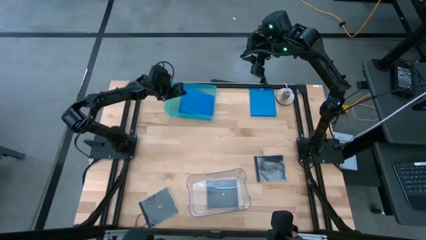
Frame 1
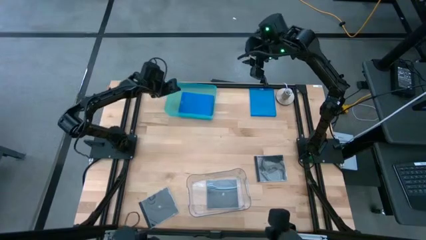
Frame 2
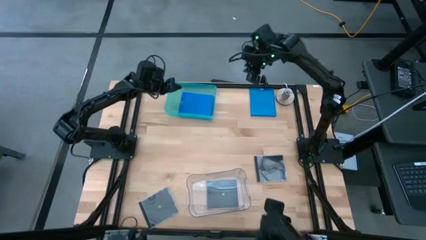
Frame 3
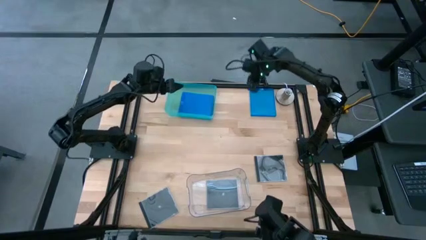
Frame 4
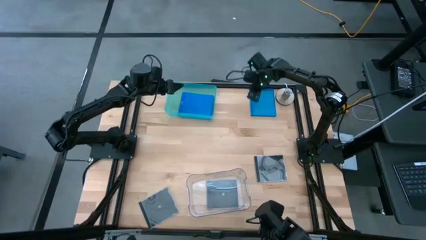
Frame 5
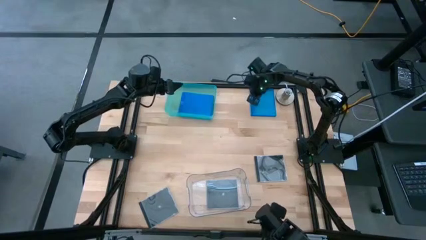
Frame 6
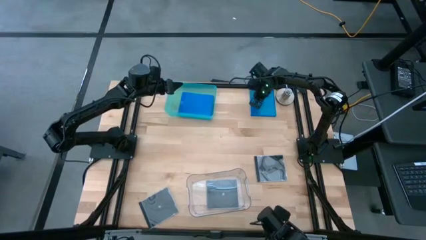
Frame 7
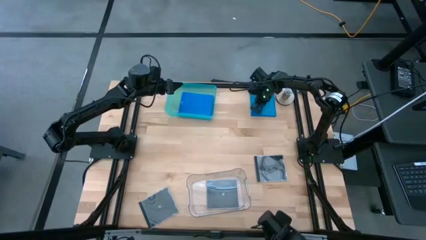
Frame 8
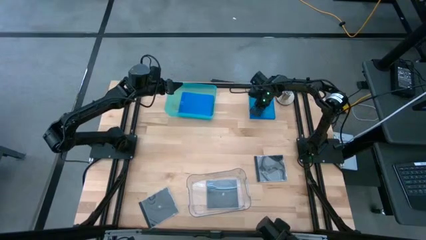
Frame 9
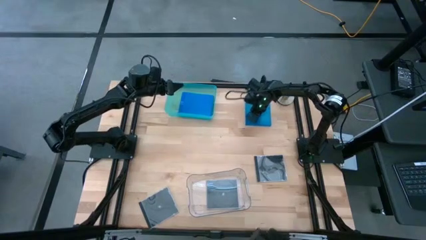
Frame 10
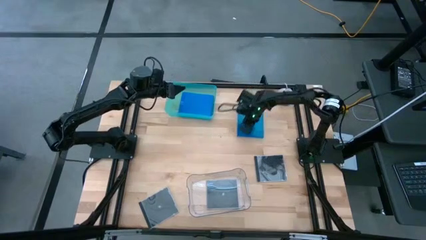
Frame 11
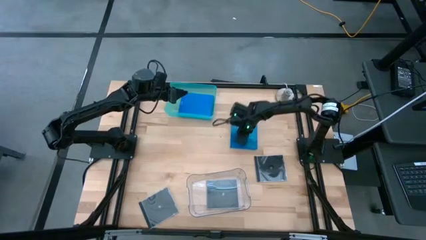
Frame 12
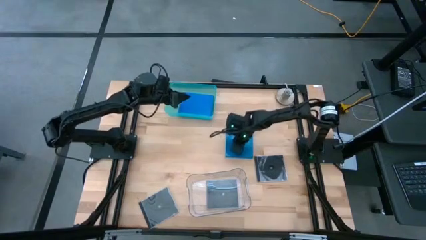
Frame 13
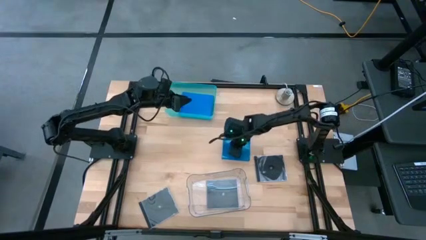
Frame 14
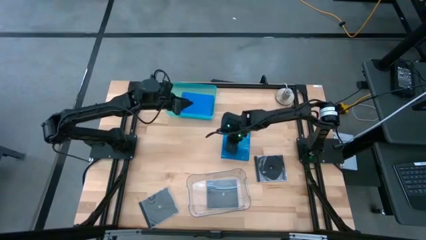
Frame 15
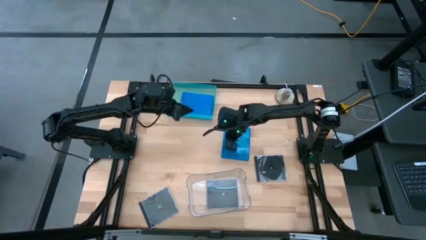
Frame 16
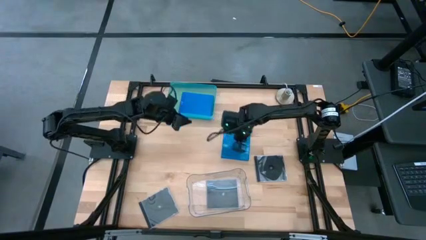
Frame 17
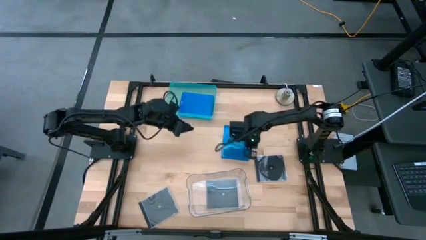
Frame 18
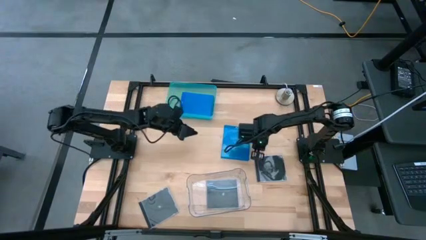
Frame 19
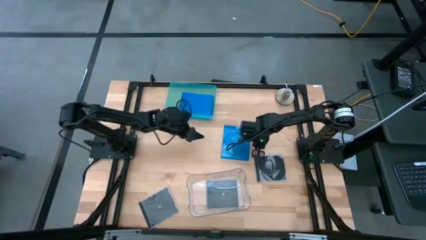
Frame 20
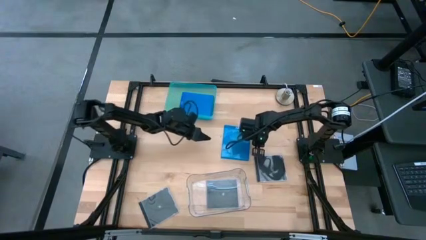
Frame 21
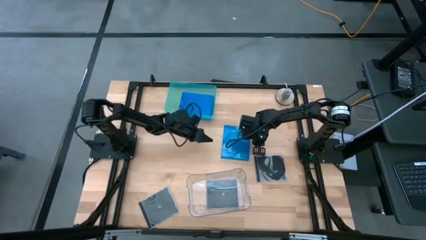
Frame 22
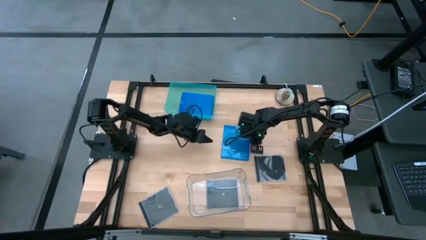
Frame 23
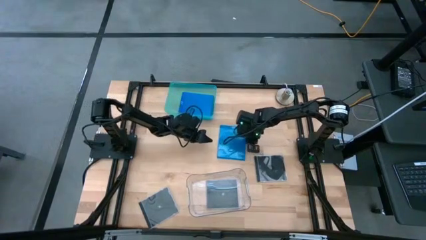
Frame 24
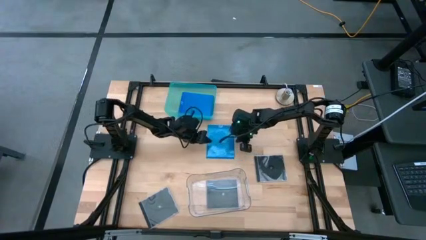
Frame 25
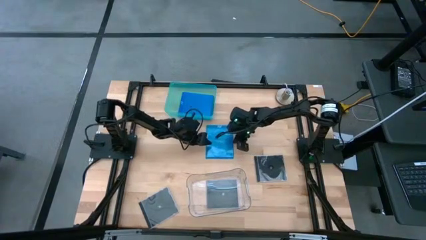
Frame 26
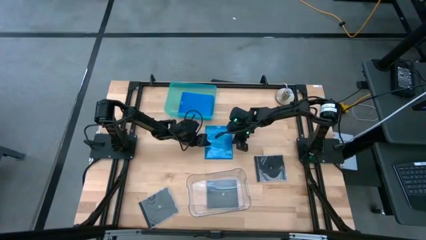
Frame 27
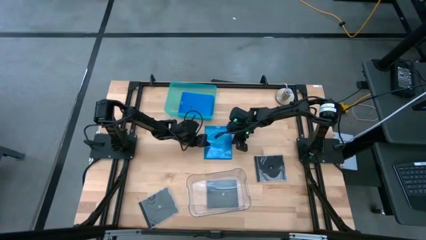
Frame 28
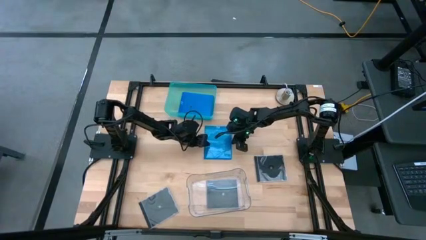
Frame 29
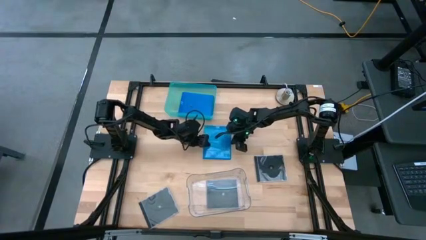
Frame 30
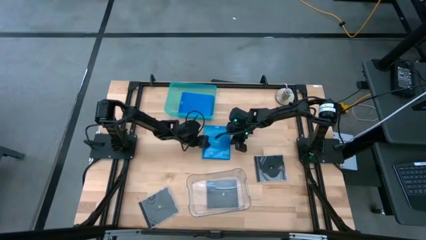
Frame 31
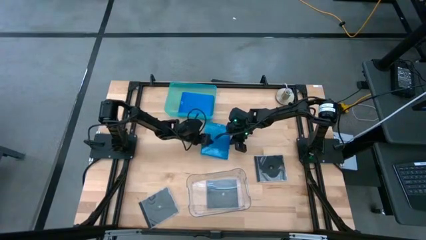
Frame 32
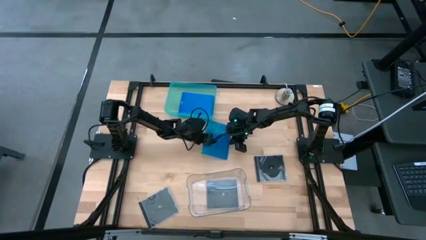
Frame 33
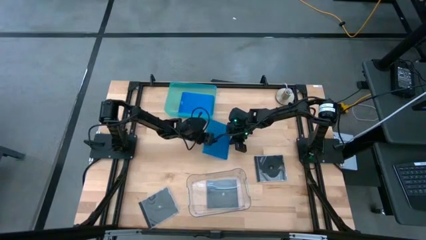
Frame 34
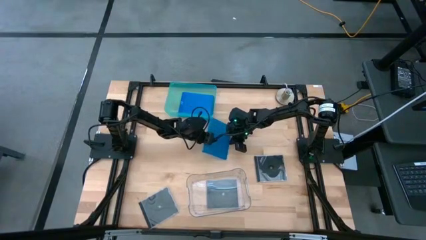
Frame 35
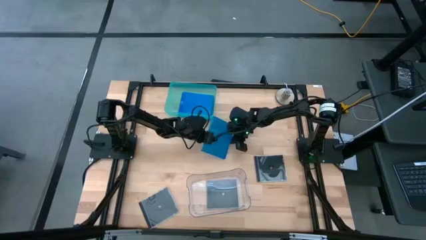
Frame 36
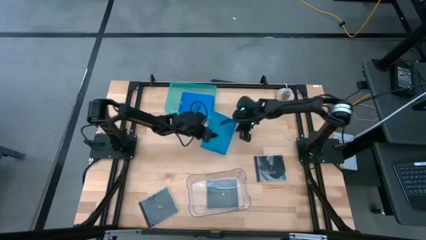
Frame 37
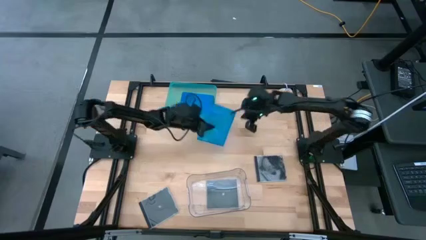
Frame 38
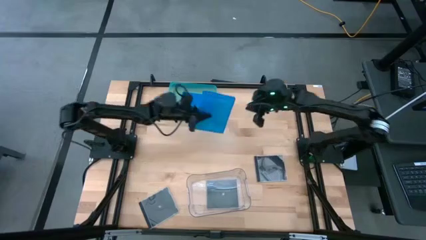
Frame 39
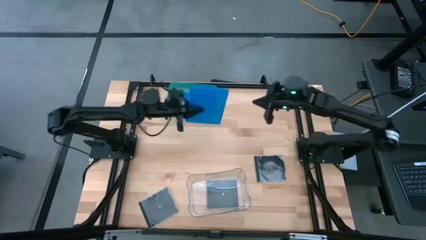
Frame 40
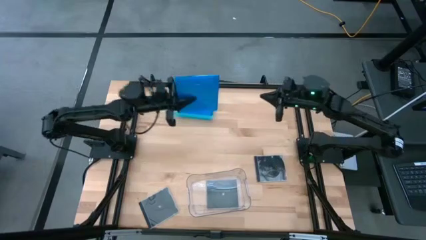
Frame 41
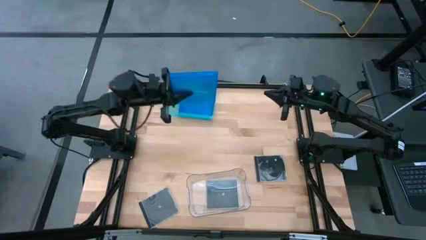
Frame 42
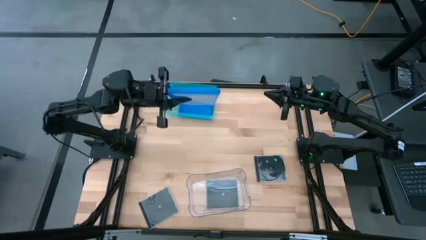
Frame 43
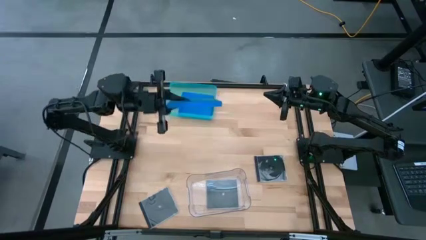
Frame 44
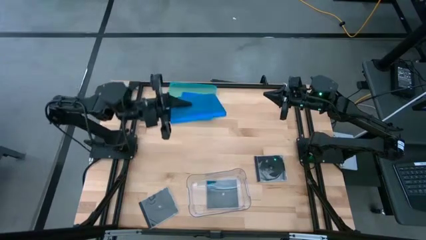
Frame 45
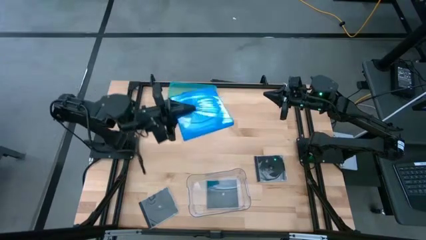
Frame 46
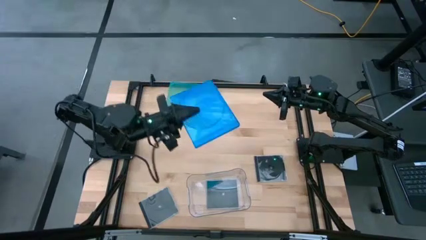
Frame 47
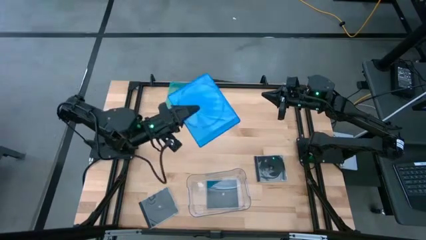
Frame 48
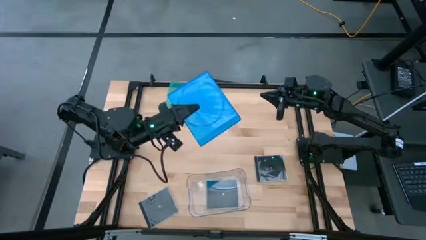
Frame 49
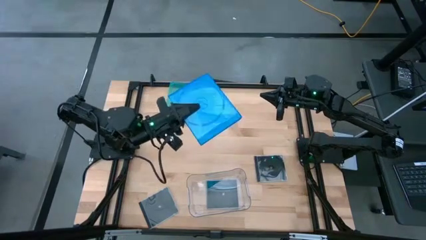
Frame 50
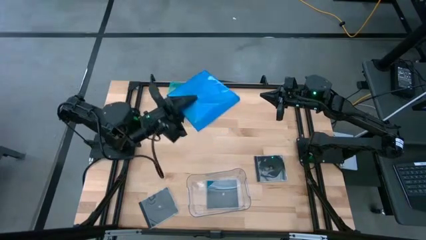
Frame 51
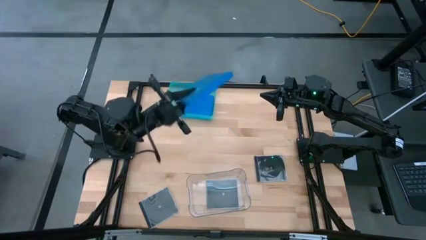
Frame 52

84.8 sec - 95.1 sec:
Task: Pick & place jewel cases by type
Put the blue CD case into the green bin

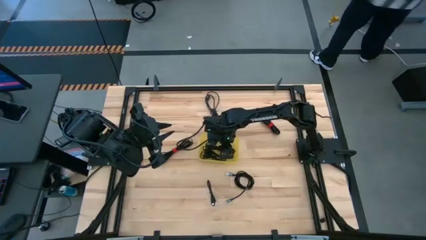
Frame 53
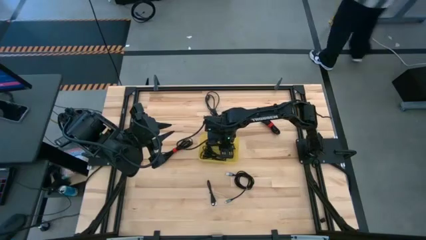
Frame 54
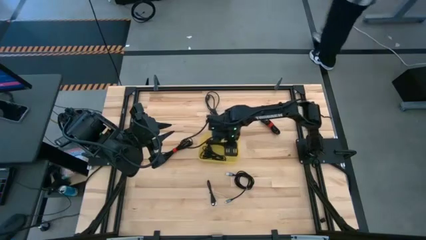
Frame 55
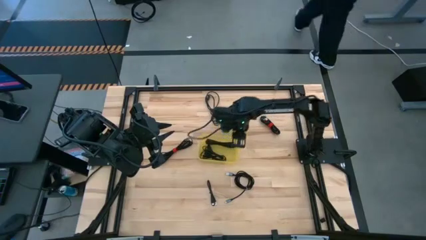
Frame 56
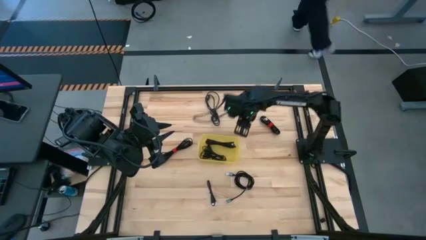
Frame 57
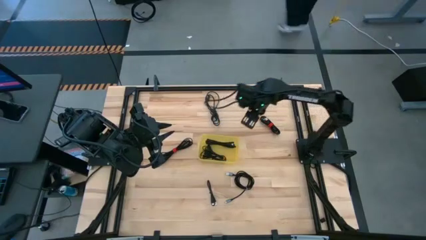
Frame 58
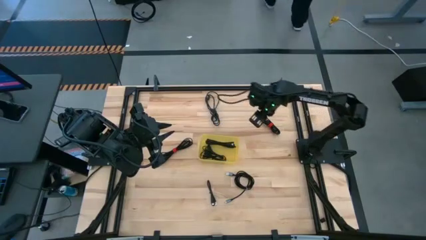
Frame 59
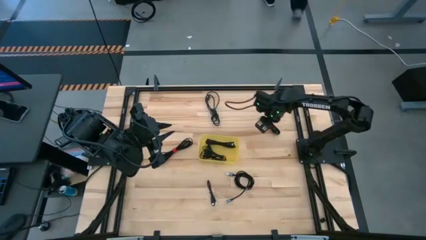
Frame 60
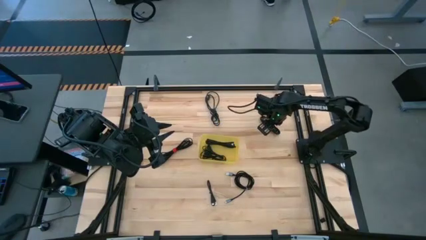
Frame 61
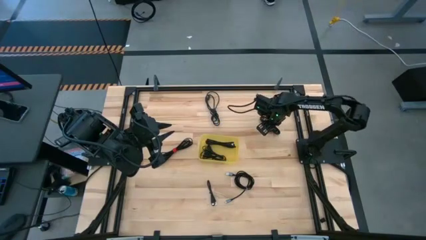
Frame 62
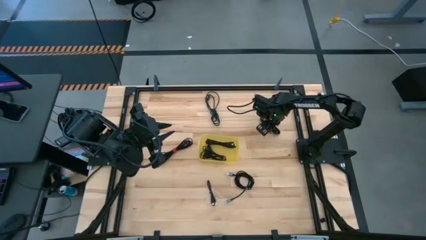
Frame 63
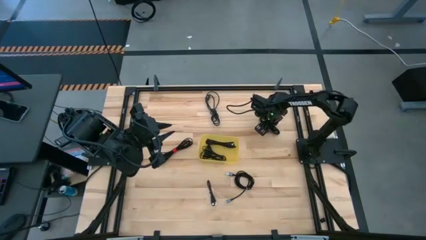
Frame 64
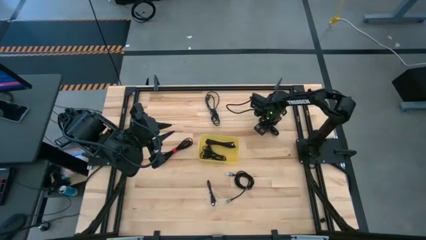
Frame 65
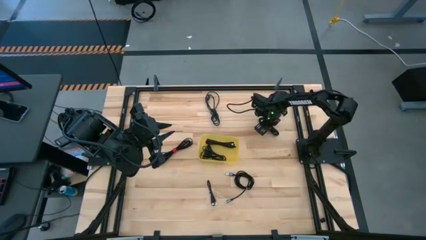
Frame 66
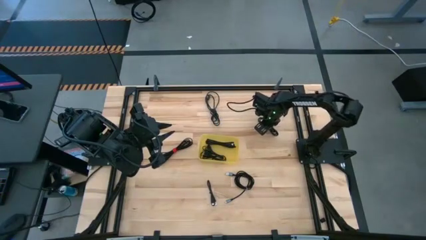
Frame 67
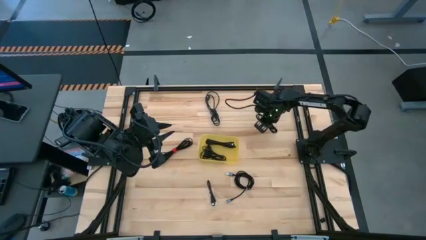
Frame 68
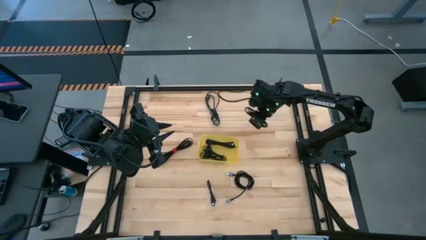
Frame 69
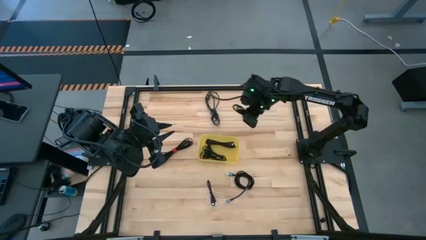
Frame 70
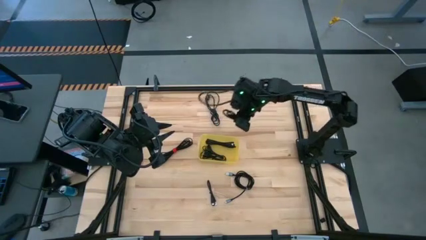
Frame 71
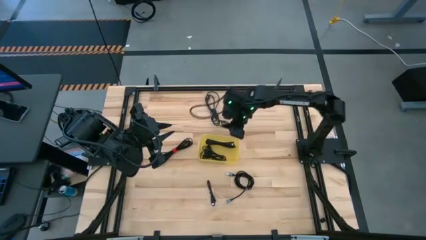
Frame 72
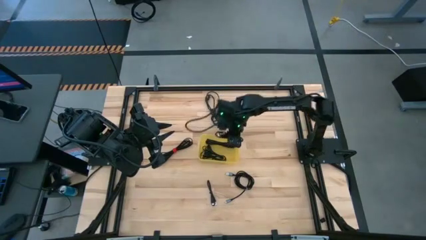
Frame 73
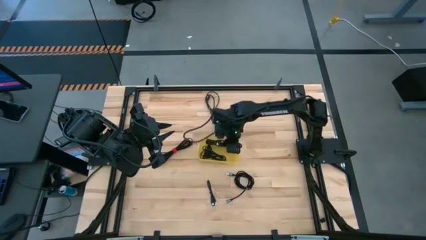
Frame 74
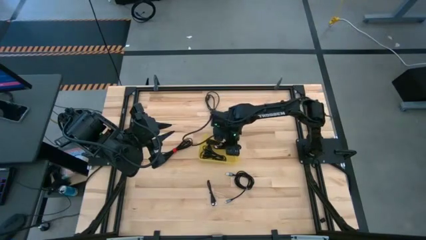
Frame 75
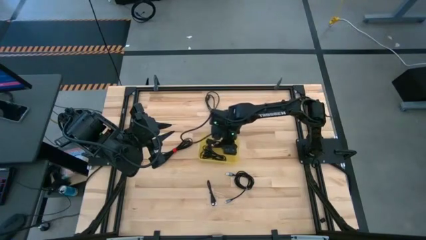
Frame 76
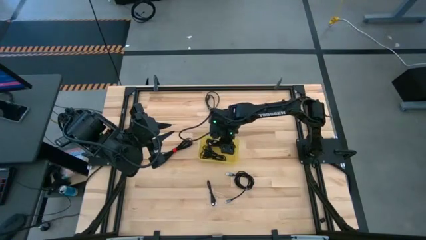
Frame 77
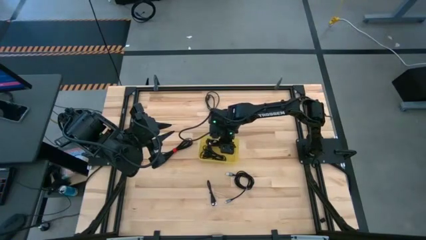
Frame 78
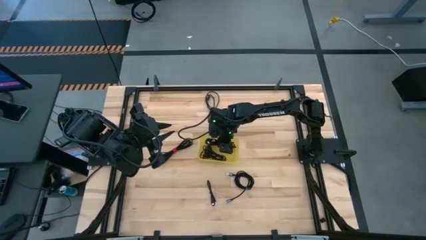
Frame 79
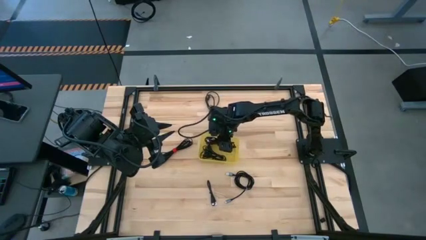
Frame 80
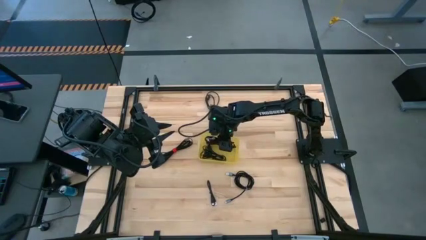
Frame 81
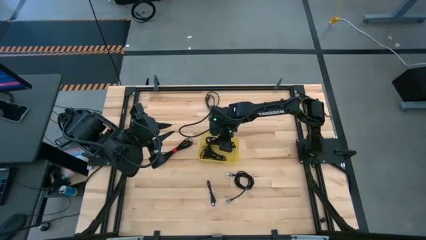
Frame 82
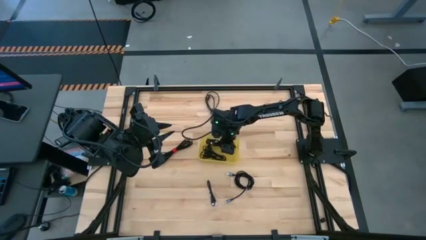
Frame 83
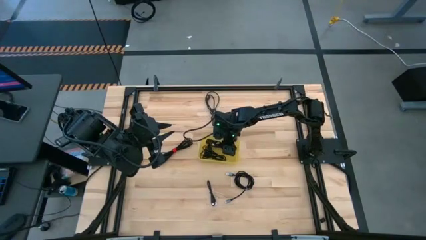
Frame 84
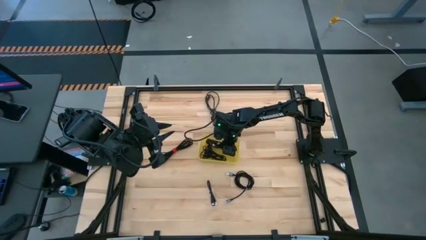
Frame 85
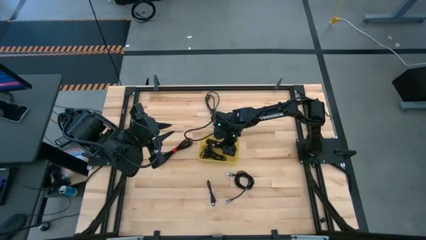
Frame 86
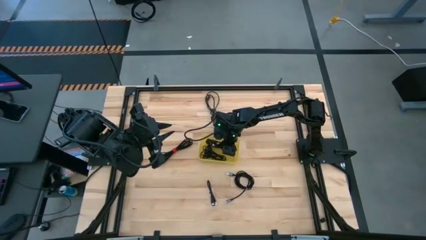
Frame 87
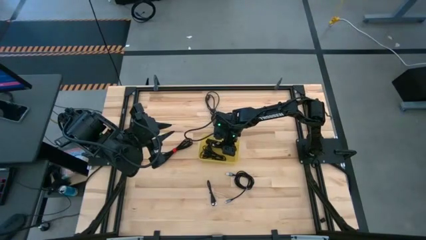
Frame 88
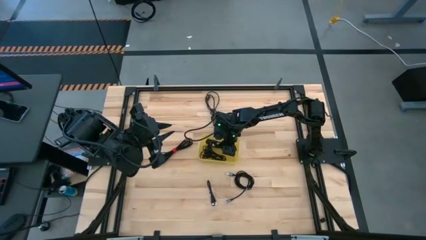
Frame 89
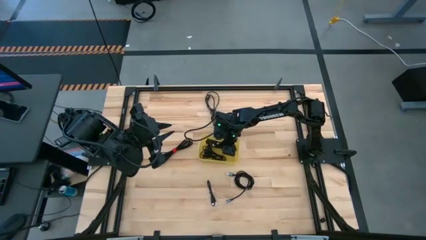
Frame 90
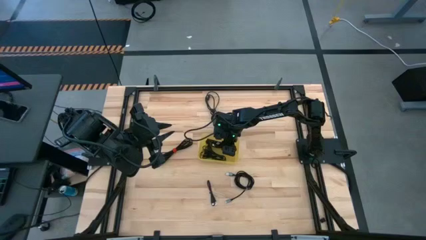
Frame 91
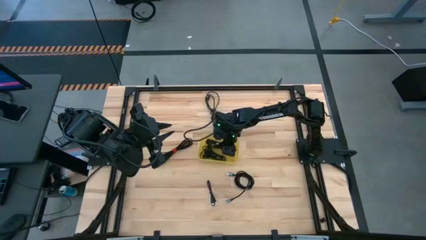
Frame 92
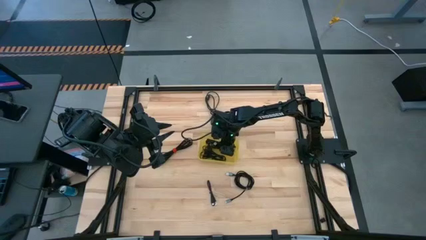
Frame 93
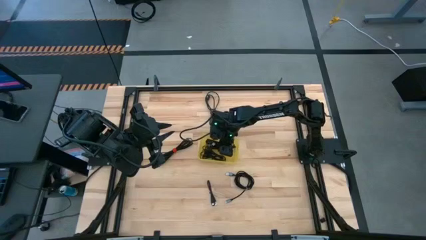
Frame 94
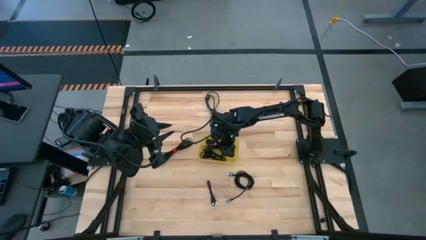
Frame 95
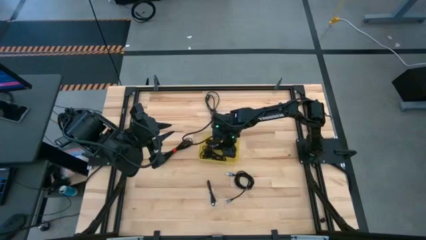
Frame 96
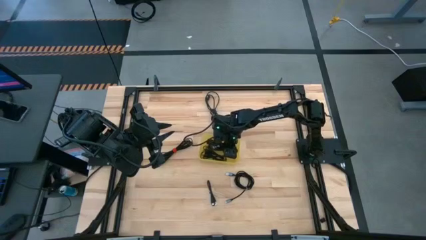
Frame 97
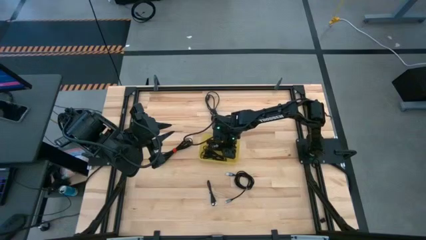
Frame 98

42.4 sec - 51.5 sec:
Task: Pick and place USB-C Cables
Put the black charger cable into the yellow bin
